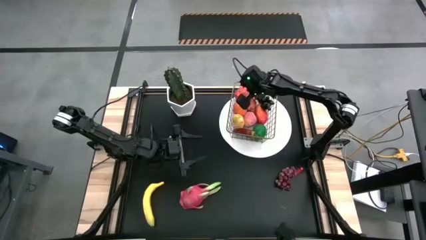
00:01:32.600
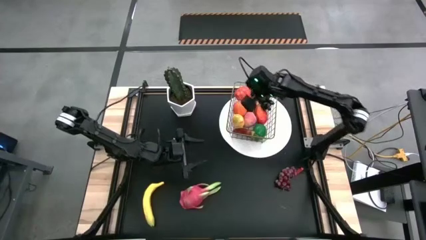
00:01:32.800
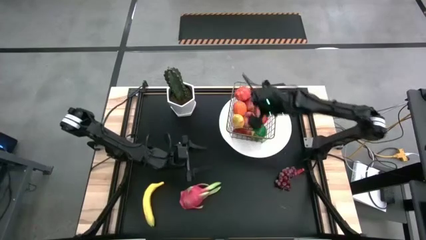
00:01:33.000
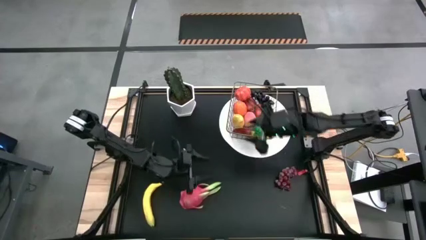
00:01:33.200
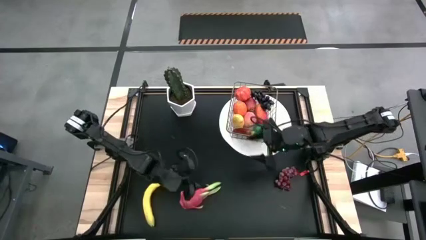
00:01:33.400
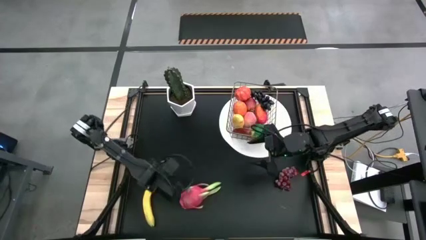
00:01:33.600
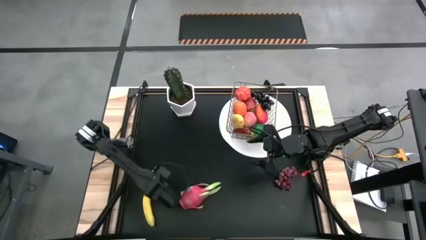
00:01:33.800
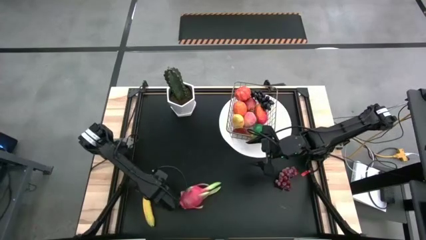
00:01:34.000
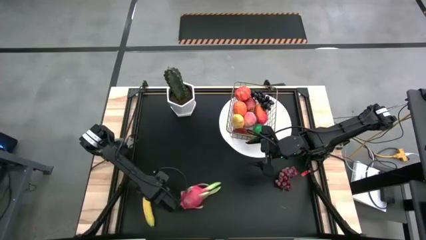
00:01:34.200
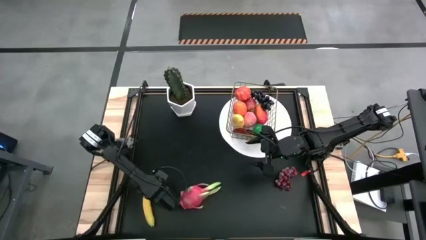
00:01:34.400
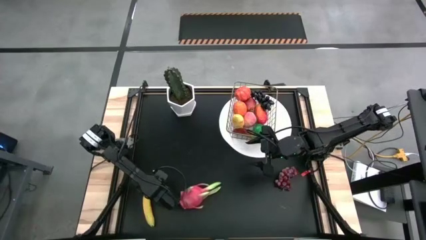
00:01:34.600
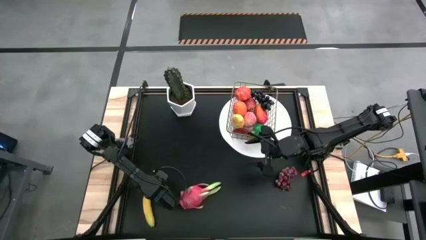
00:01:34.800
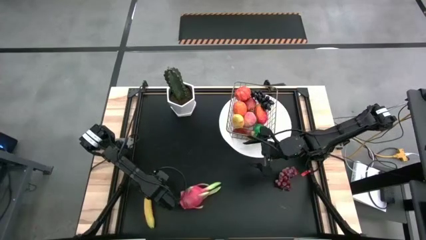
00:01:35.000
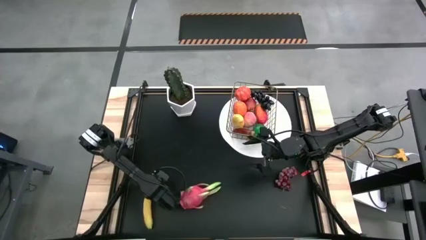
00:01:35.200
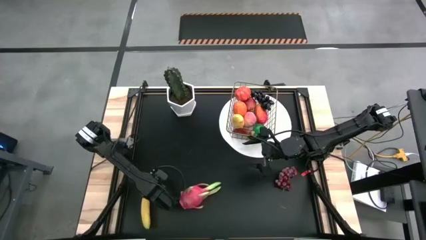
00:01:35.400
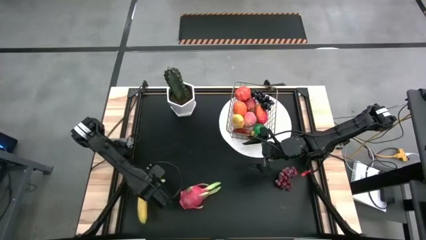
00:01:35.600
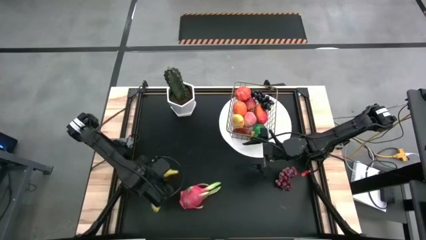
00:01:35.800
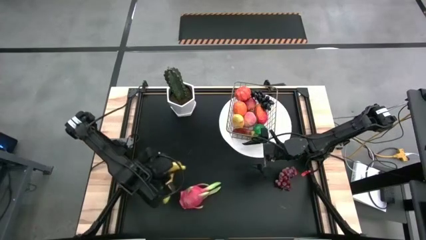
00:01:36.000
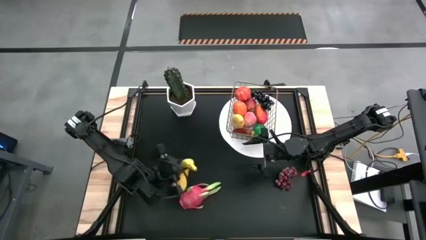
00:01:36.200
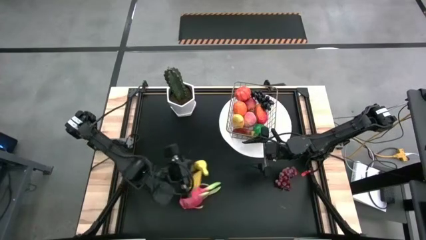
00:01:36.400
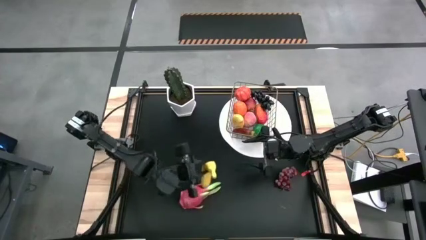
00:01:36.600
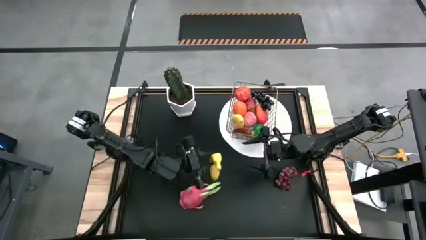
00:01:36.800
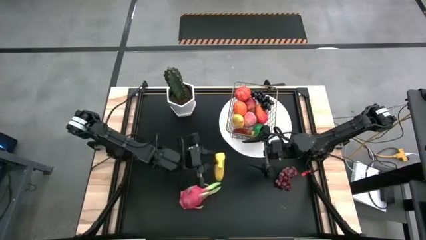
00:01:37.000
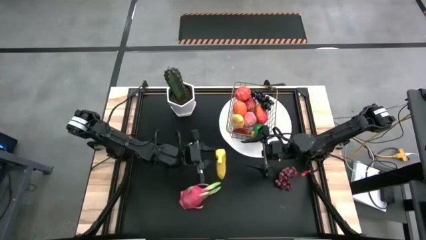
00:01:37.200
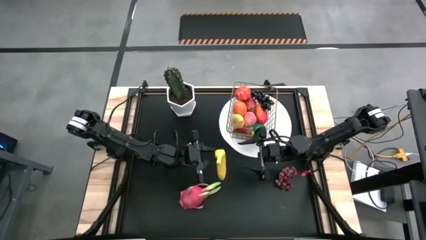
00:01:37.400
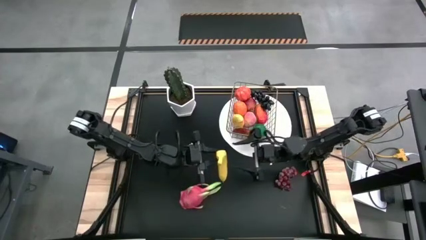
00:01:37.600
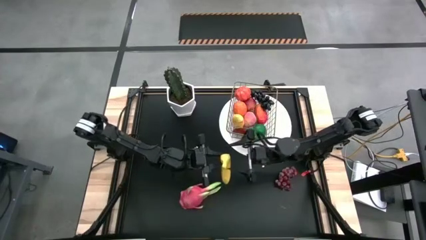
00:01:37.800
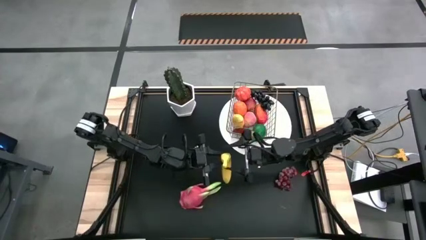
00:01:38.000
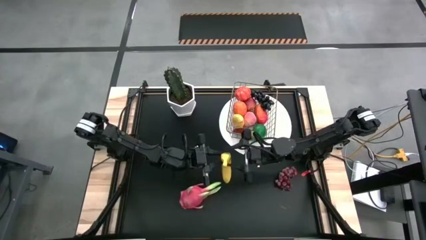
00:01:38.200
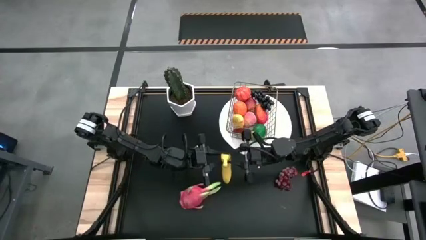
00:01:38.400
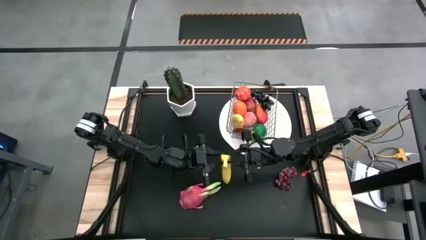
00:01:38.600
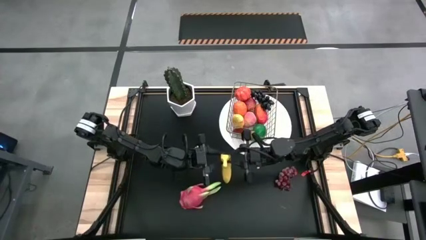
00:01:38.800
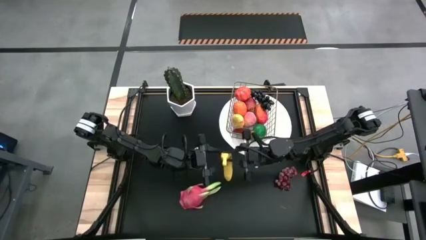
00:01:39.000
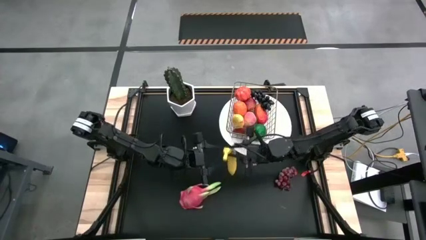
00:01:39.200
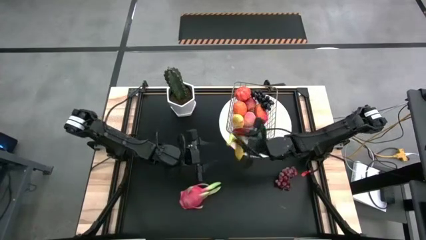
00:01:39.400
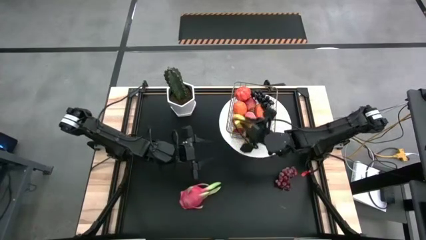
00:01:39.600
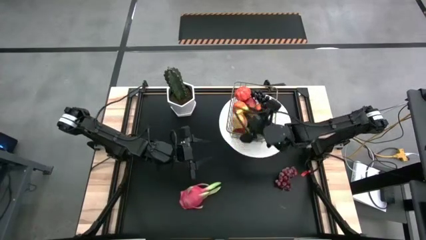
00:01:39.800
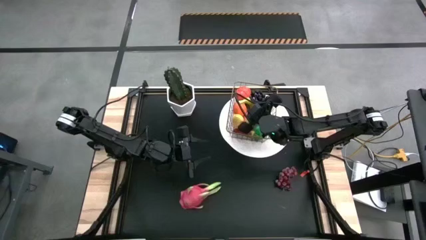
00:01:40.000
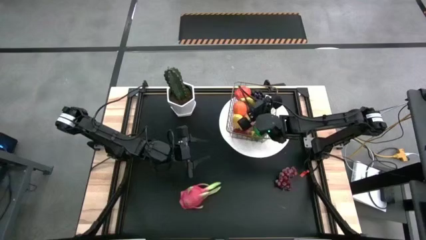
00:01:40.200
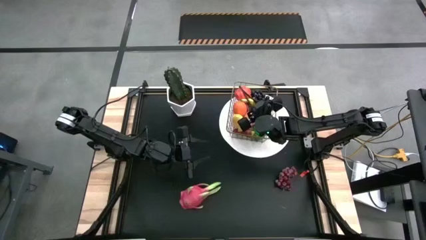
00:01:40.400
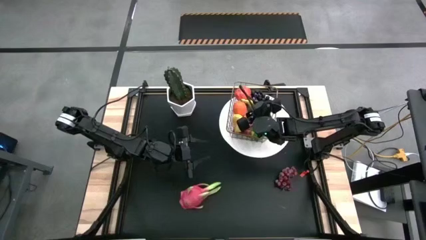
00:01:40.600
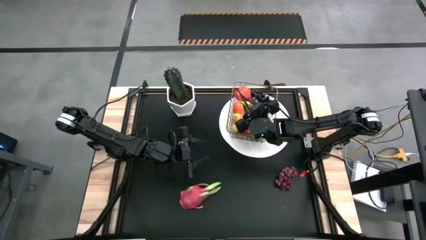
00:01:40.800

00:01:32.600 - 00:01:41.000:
Task: Build produce basket
Put the banana into the wire basket

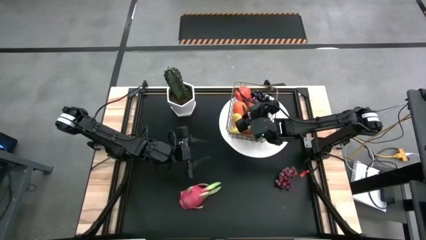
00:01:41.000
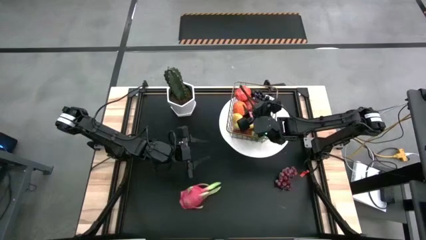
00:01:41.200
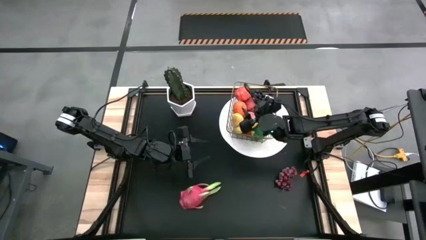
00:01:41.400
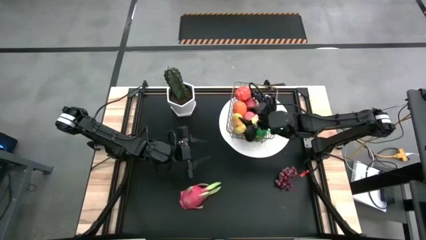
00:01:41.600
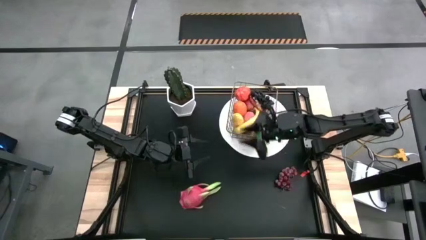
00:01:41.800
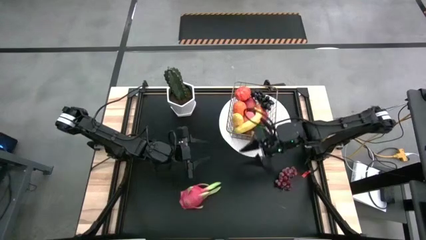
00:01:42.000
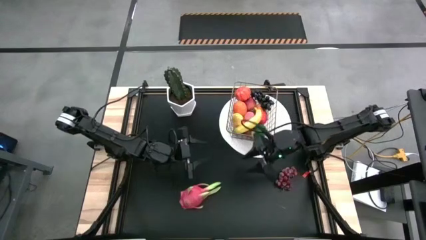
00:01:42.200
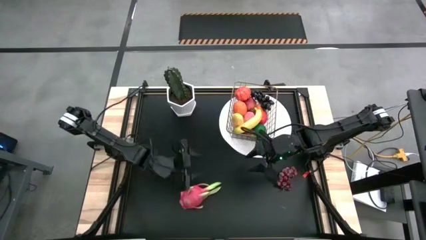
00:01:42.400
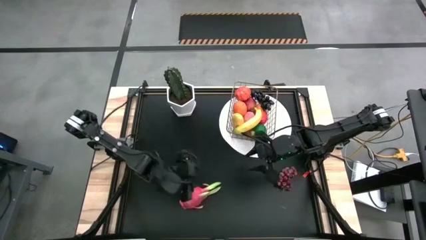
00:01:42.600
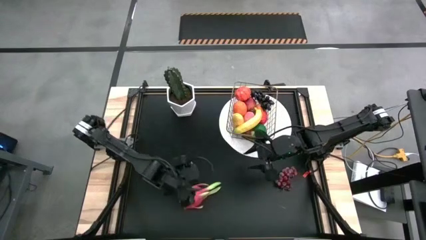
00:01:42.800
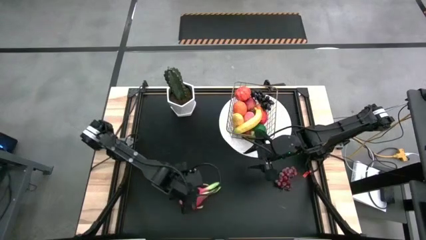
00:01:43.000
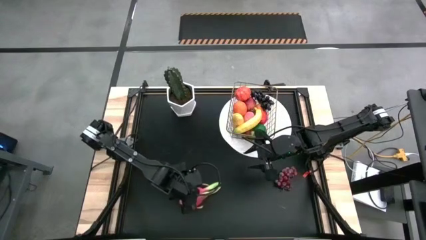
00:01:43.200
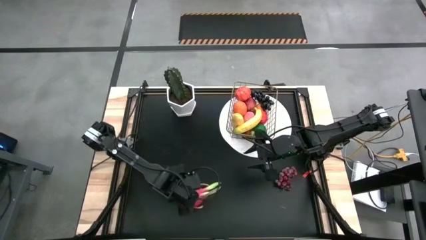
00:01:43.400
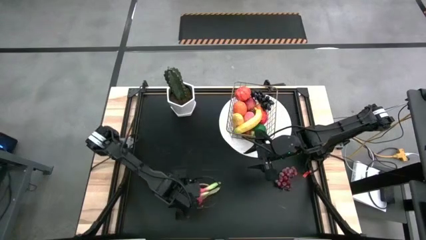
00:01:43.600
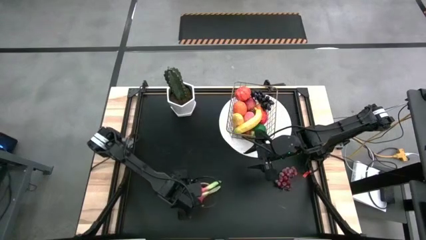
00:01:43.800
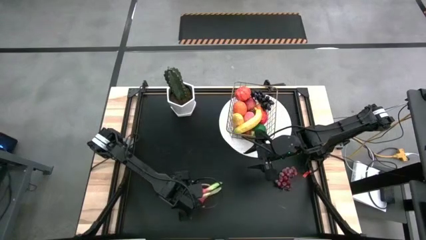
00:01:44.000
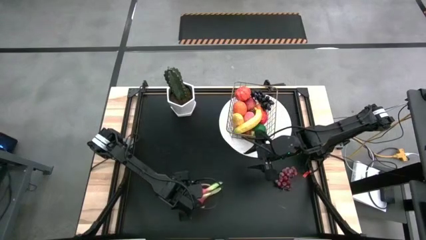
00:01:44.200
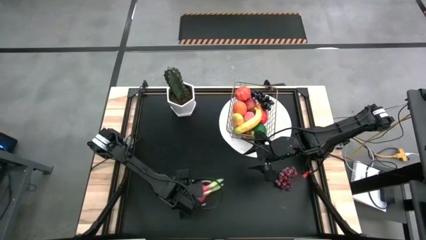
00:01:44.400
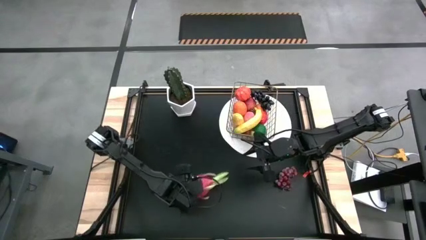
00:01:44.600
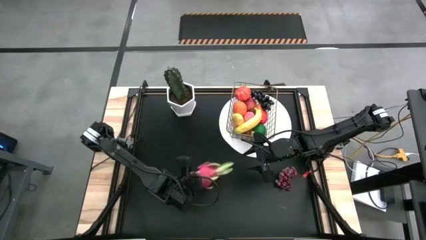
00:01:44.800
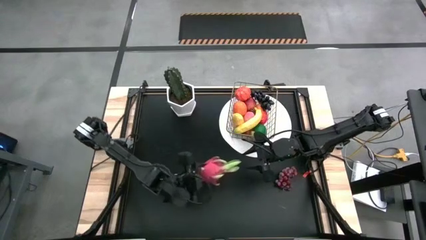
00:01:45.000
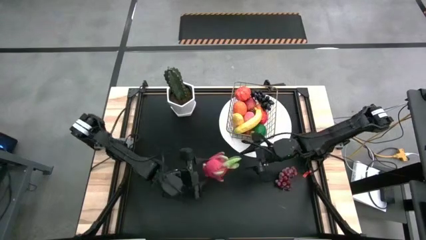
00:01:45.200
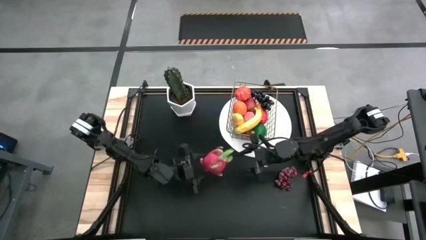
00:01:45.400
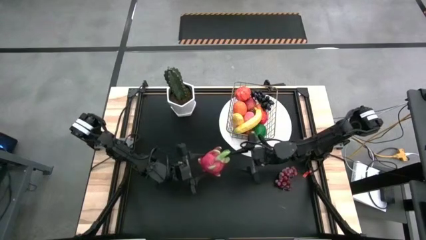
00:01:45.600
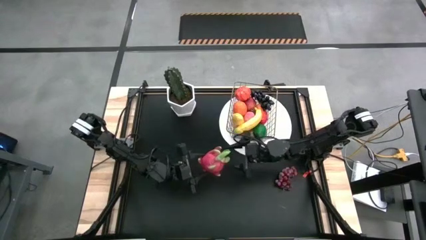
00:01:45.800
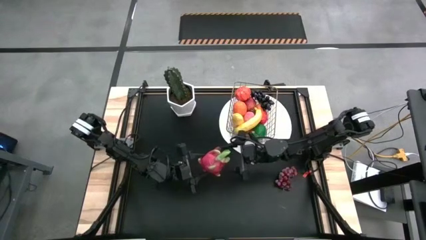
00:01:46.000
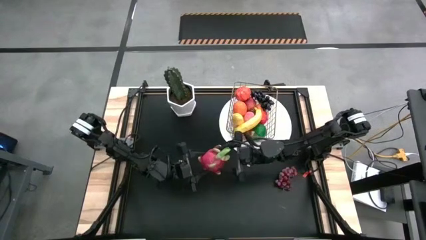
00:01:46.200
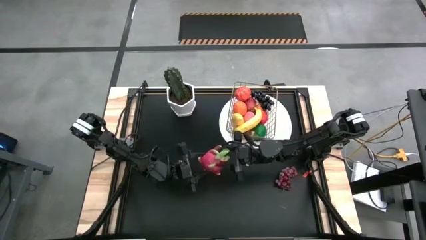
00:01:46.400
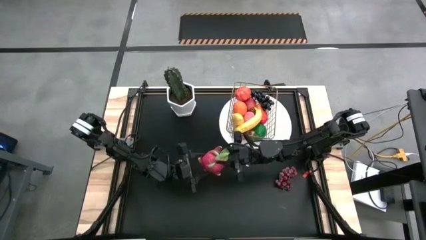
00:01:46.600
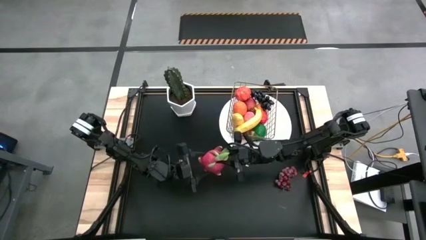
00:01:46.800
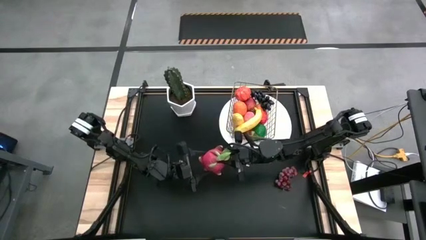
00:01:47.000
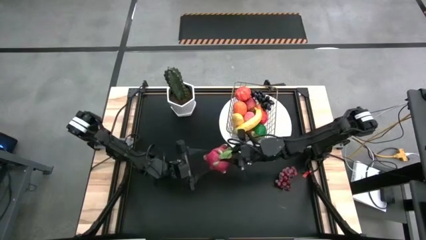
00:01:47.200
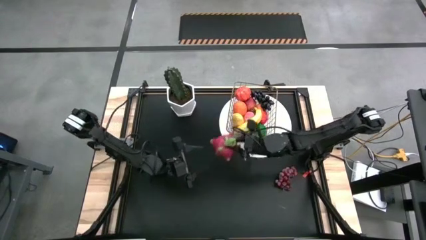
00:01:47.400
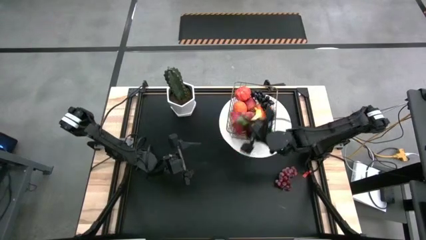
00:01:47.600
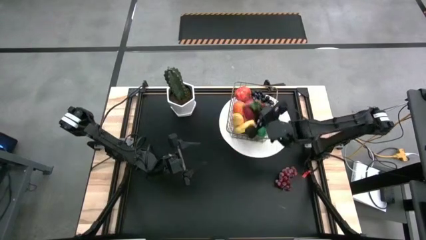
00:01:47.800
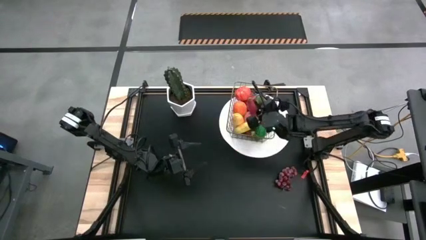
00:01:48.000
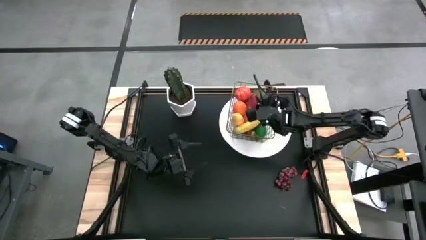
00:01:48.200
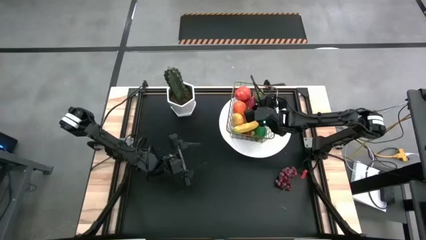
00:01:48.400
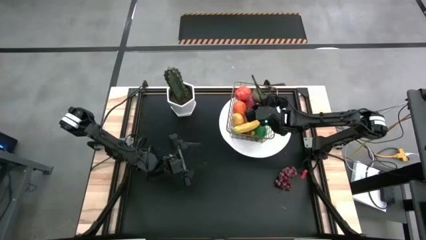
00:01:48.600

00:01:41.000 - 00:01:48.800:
Put the dragonfruit into the wire basket
